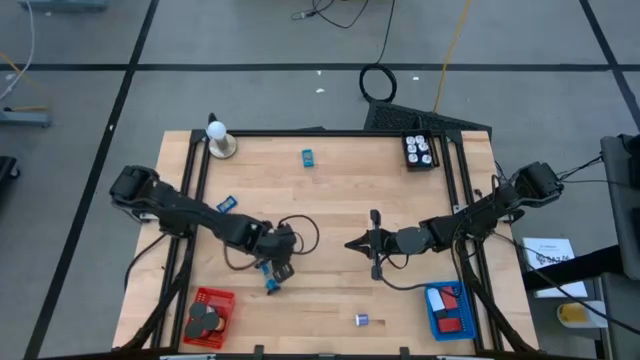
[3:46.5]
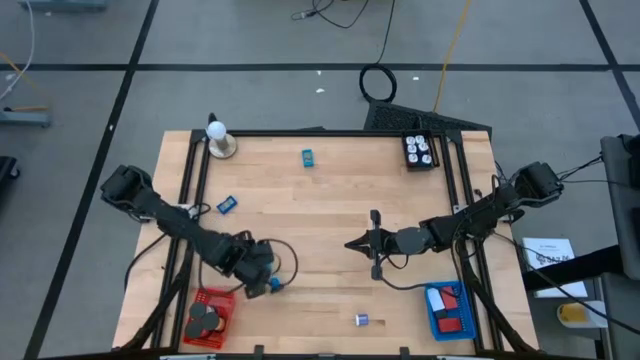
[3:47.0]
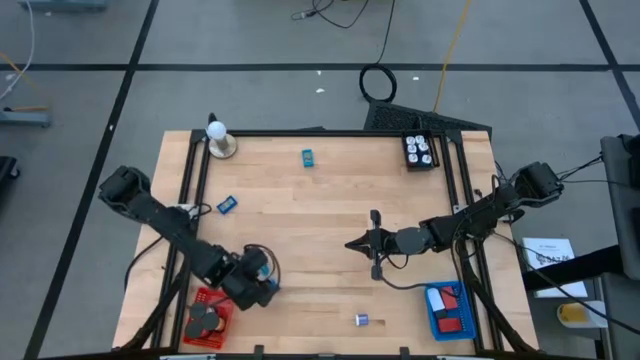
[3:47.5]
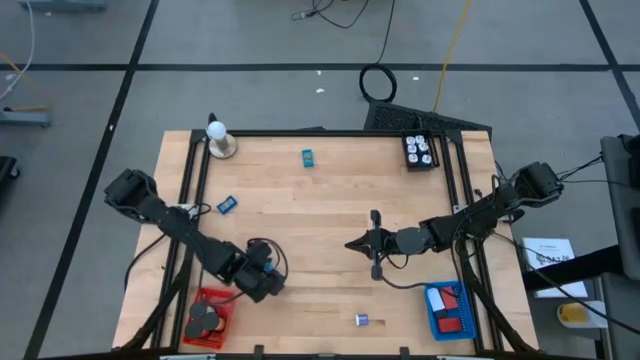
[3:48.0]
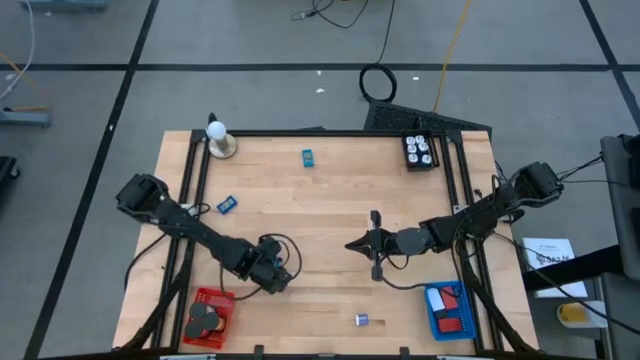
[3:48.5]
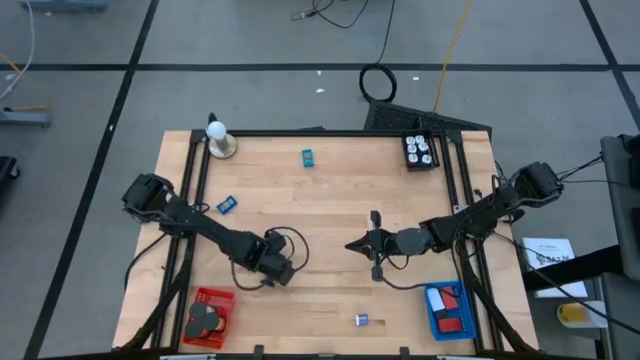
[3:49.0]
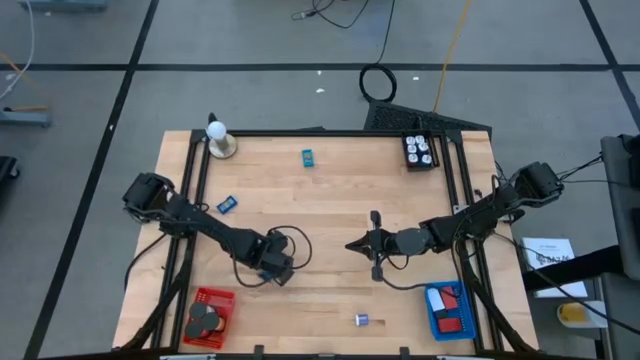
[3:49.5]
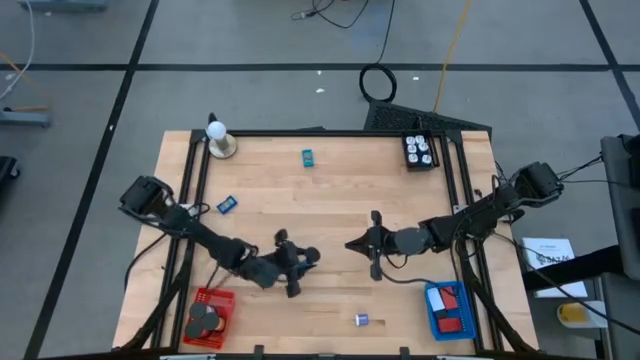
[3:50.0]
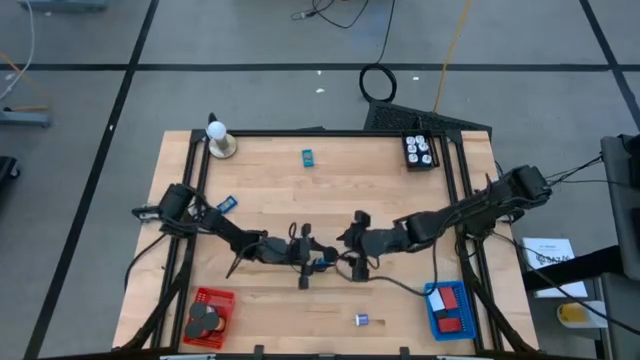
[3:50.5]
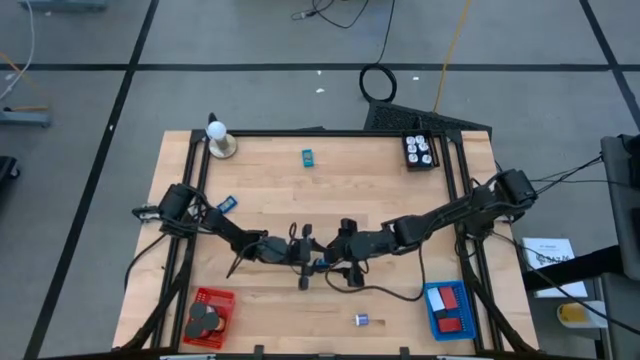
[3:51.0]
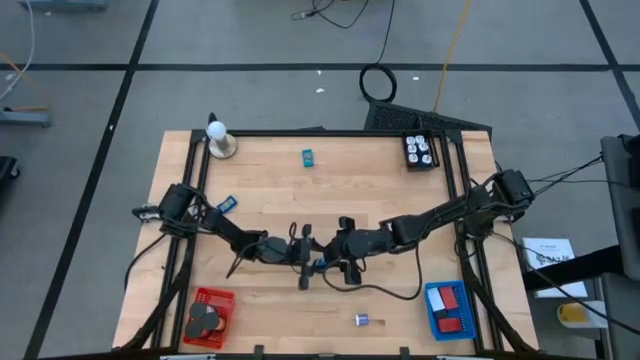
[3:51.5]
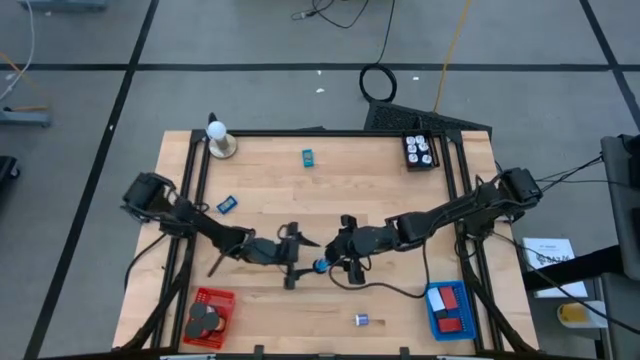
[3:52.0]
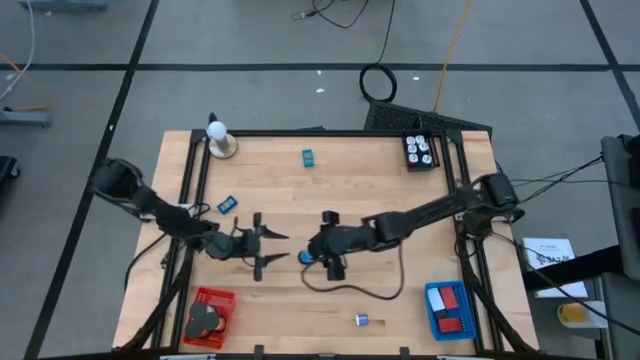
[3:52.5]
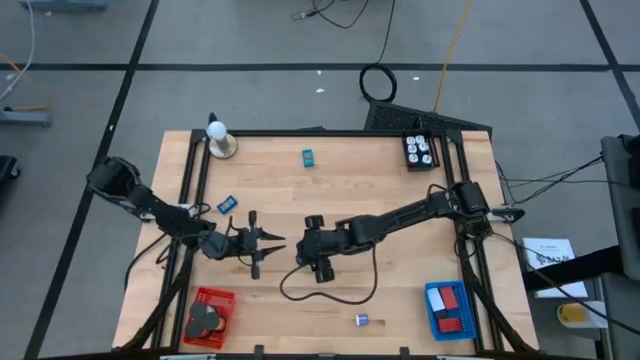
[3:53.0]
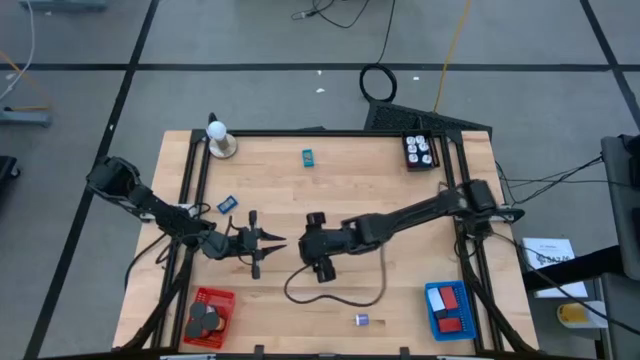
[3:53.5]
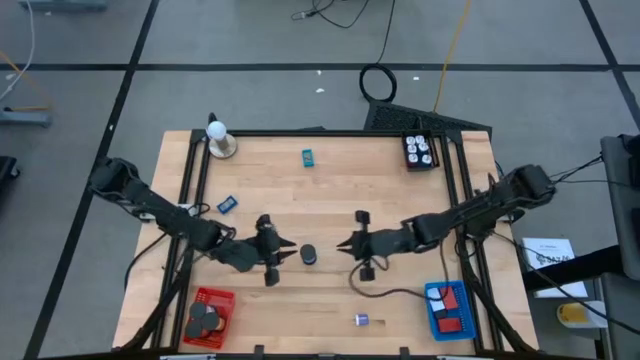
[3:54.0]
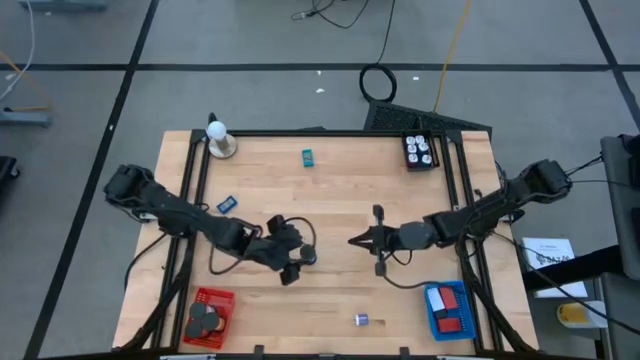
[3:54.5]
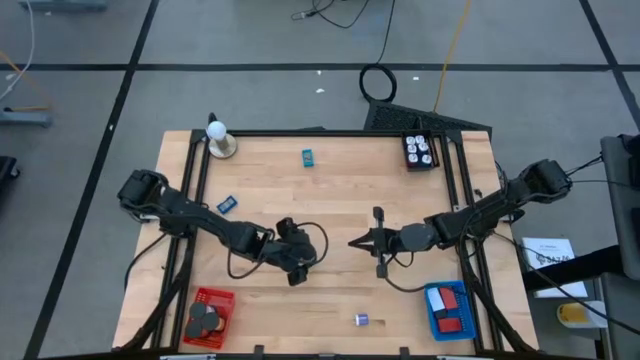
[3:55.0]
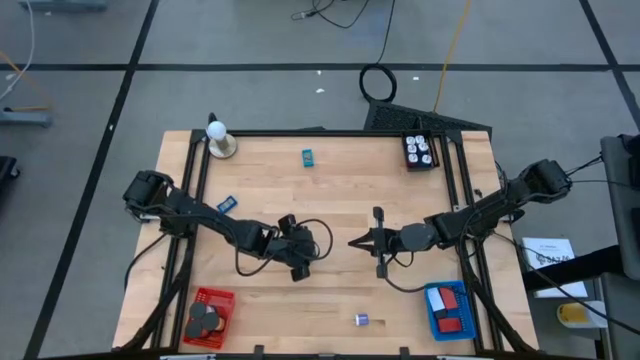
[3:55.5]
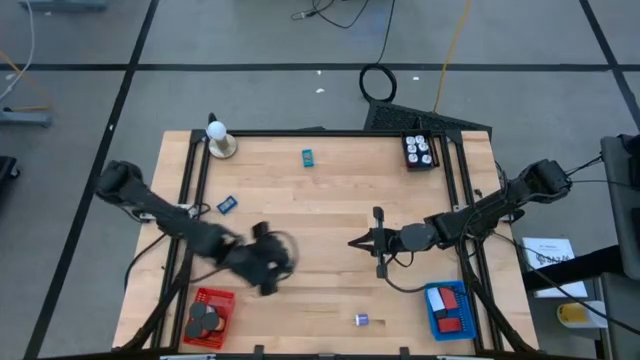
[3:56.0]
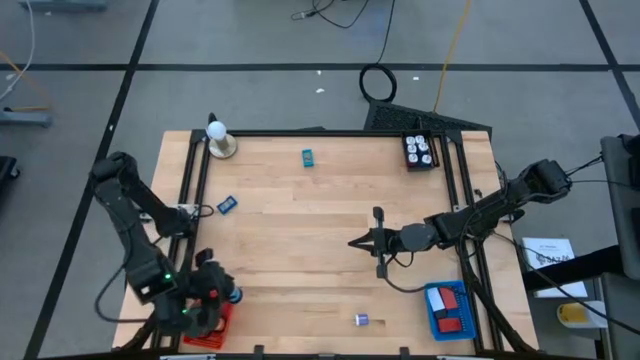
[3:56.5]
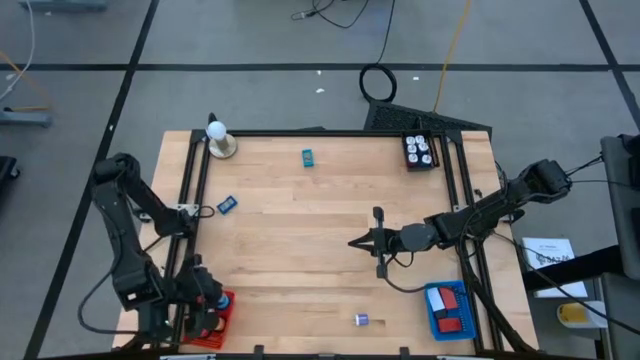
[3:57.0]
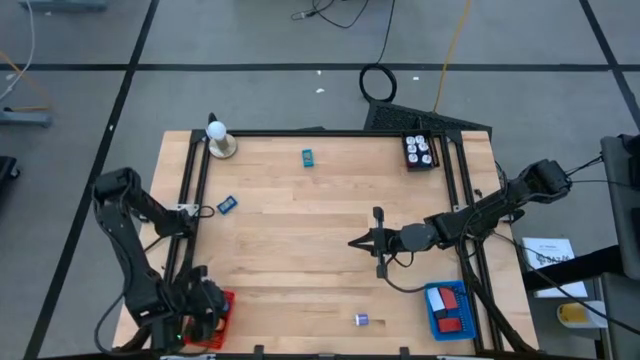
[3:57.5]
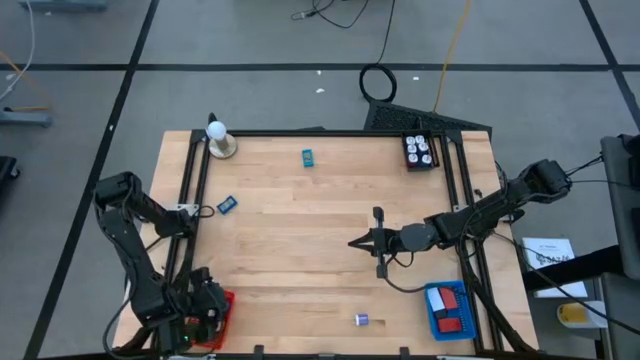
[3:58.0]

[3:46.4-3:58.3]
Task: Pick & Place Office items
Put the blue hourglass into the red bin

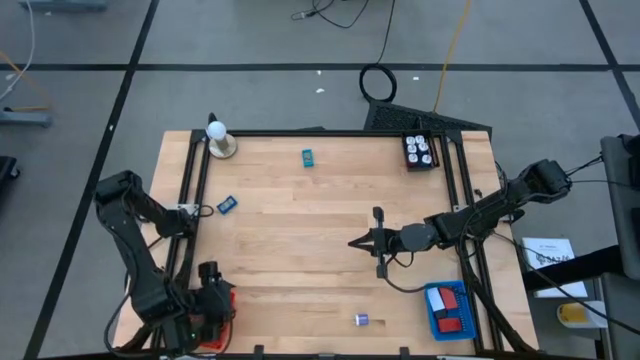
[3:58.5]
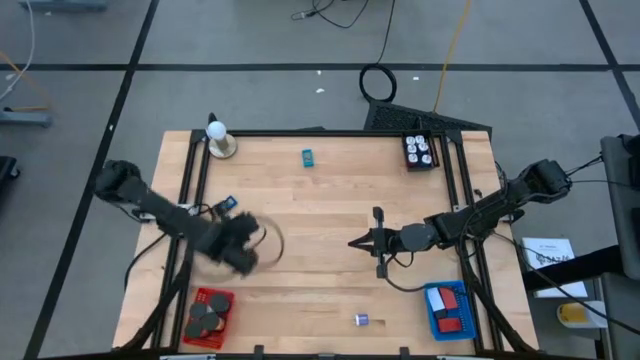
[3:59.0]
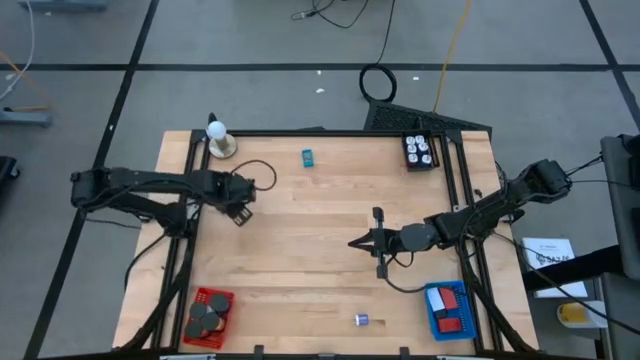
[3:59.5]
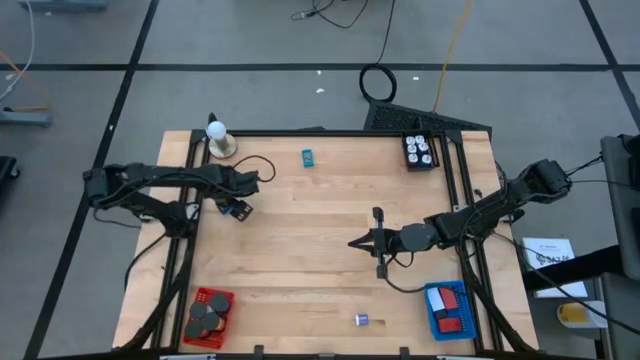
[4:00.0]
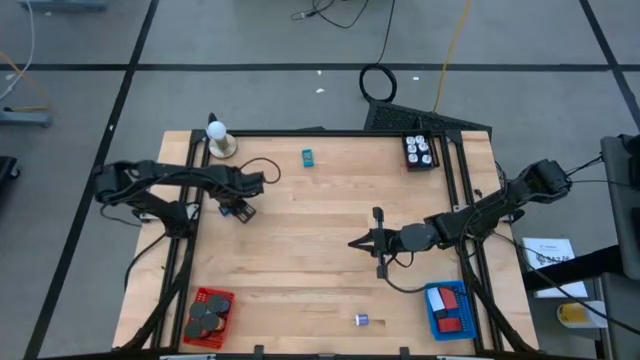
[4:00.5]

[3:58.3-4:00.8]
Put the blue digital clock into the blue bin

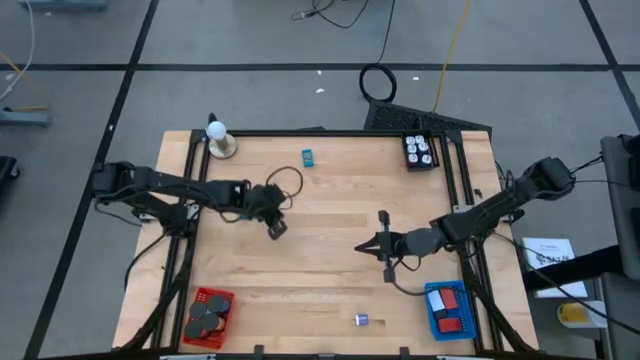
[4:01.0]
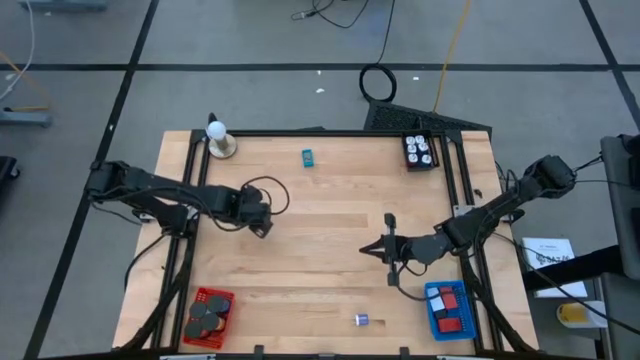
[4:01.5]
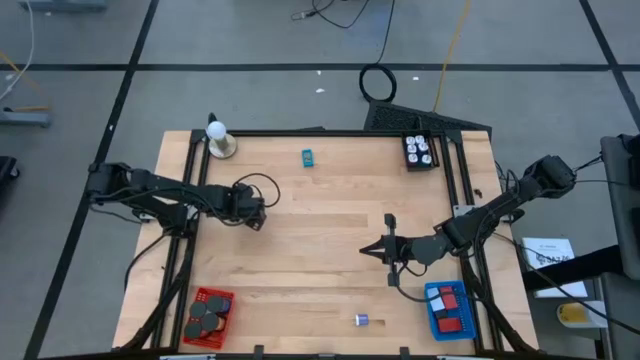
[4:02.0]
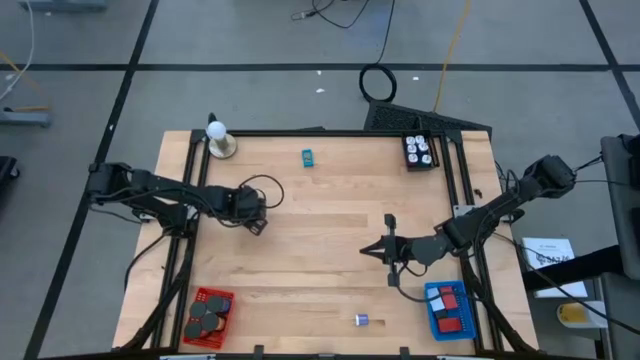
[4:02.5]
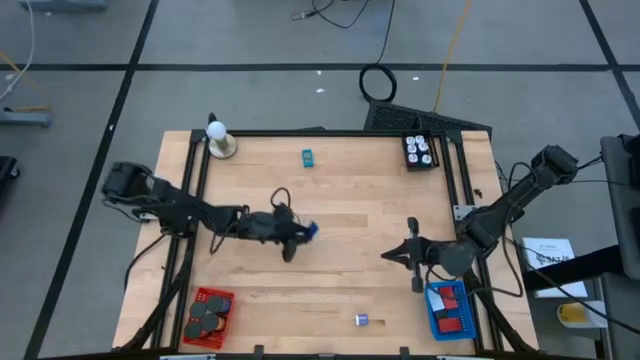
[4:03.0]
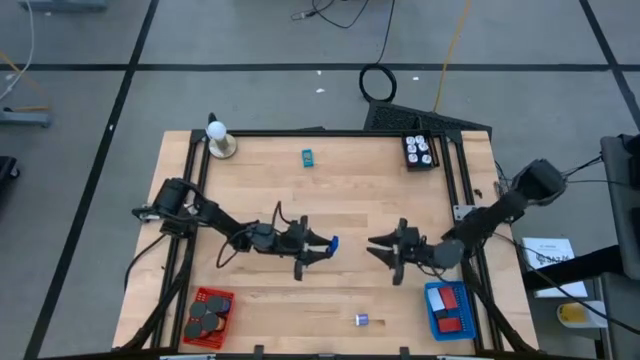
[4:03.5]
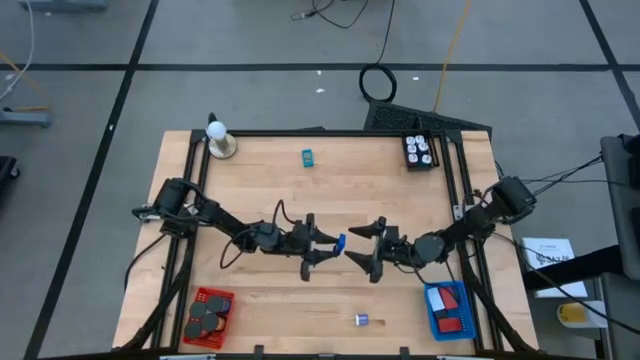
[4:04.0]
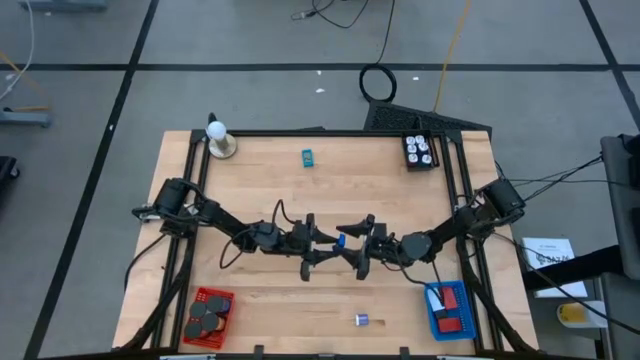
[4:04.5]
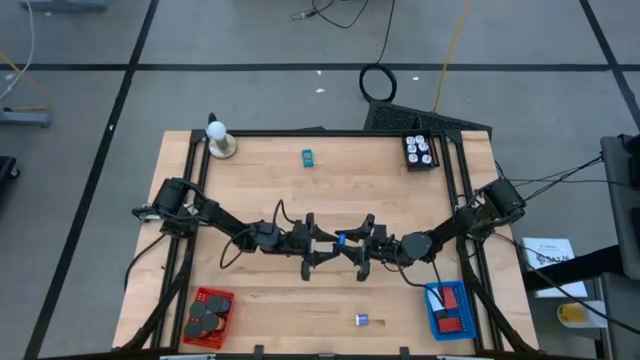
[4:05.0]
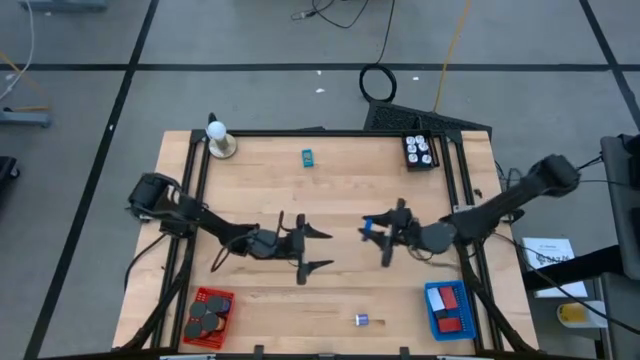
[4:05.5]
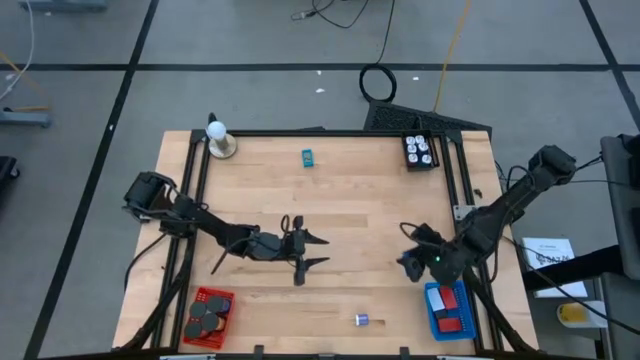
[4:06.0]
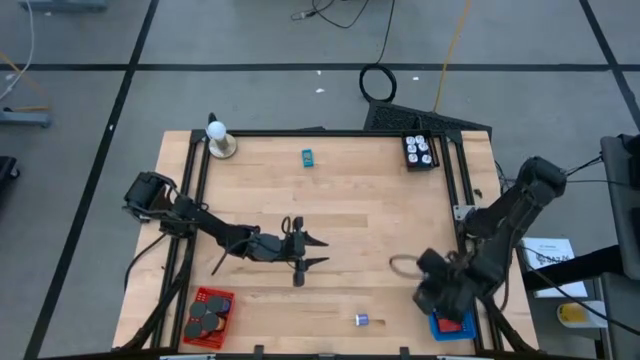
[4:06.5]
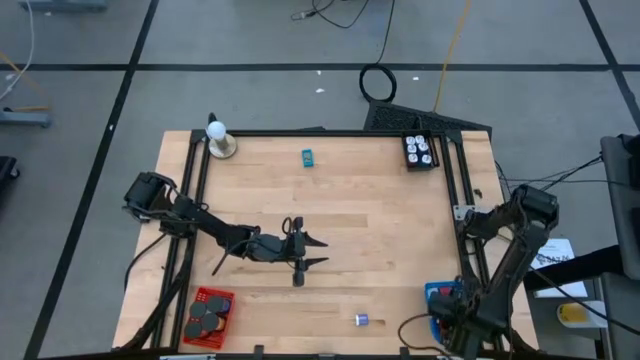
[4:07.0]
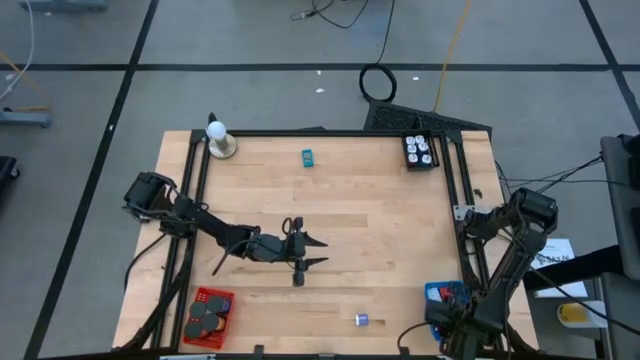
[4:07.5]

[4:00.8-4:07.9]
Put the blue digital clock into the blue bin
